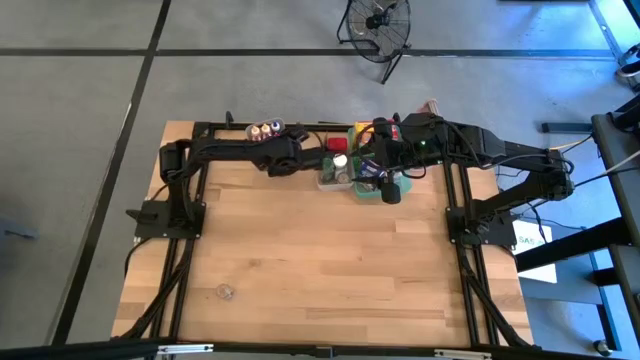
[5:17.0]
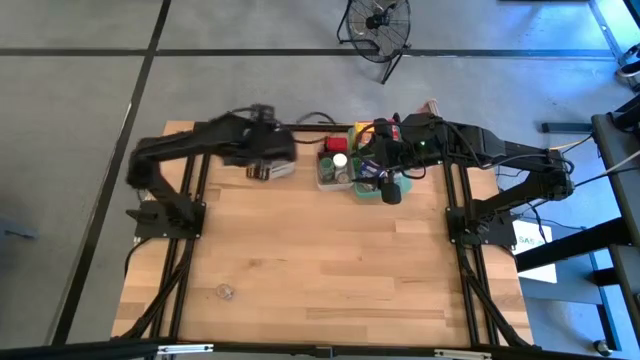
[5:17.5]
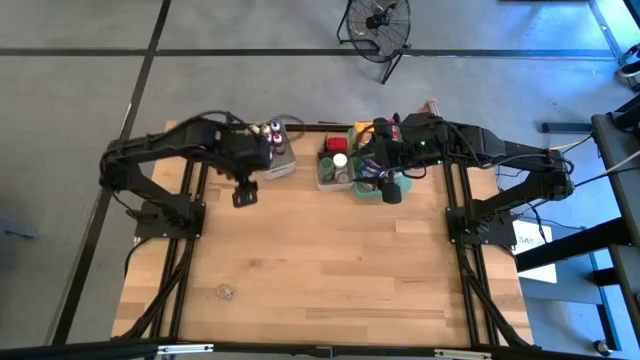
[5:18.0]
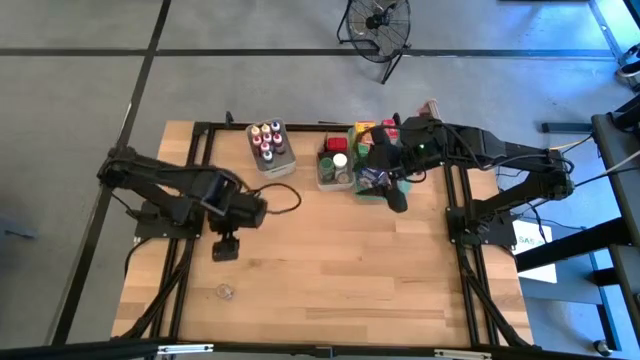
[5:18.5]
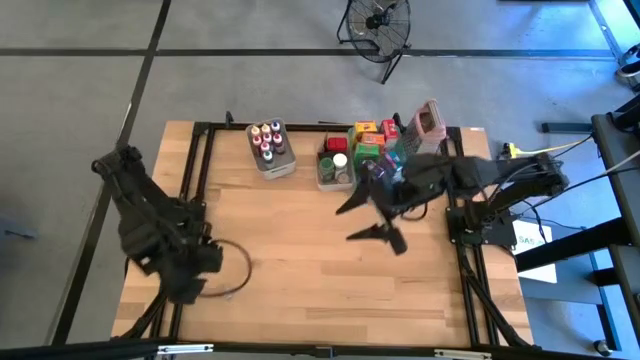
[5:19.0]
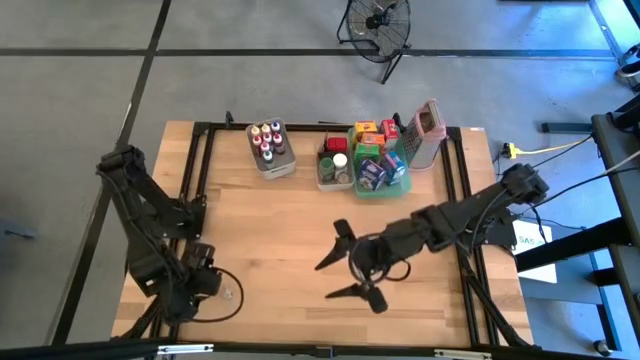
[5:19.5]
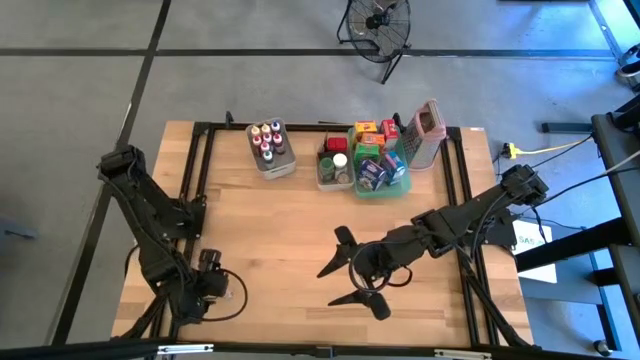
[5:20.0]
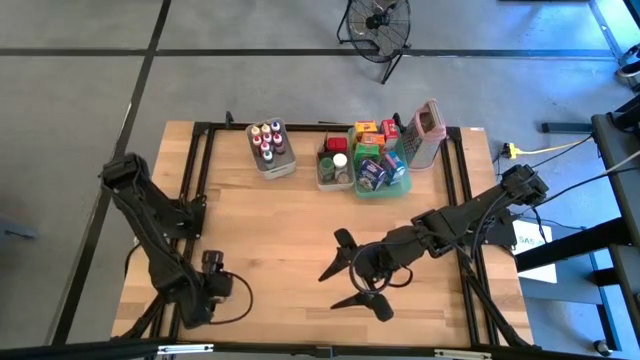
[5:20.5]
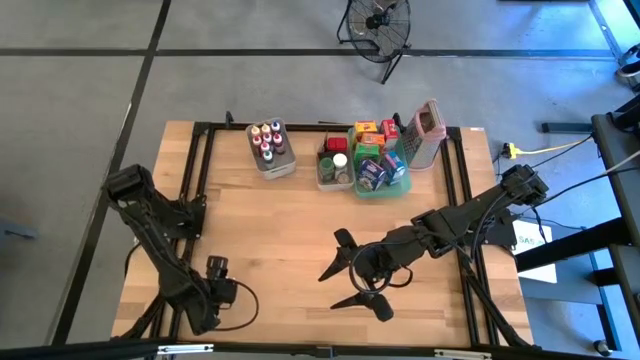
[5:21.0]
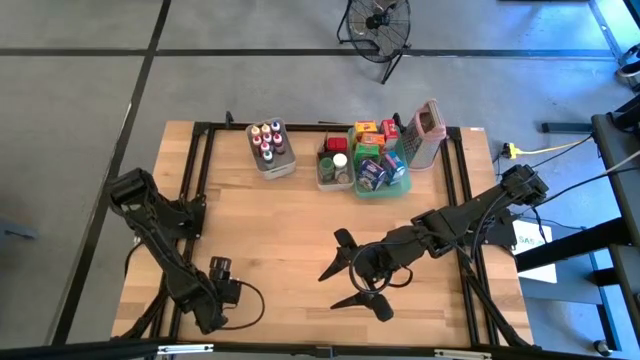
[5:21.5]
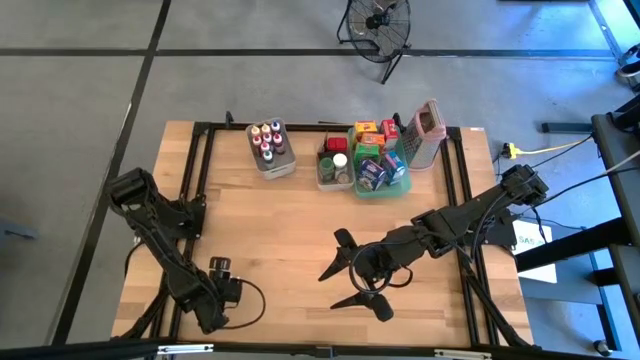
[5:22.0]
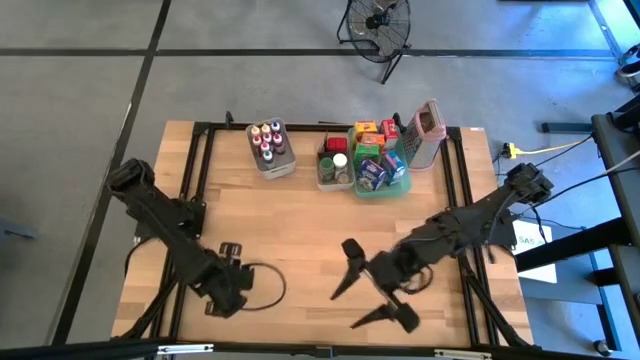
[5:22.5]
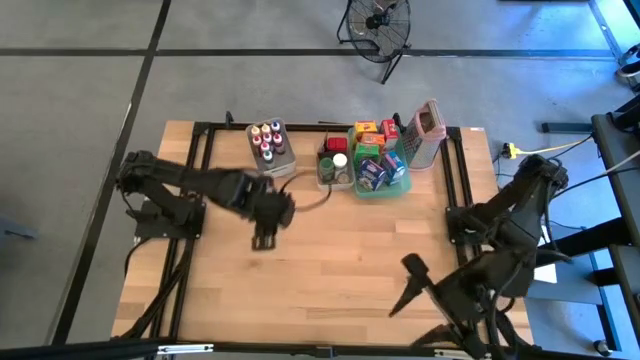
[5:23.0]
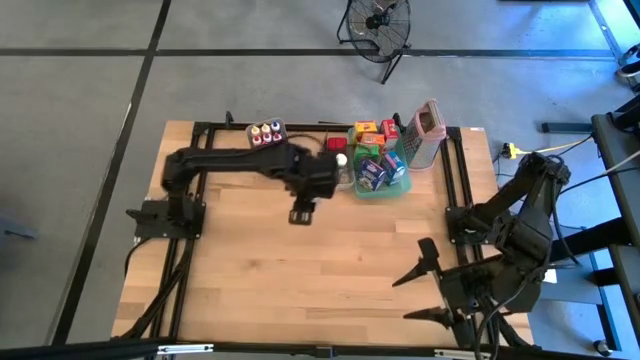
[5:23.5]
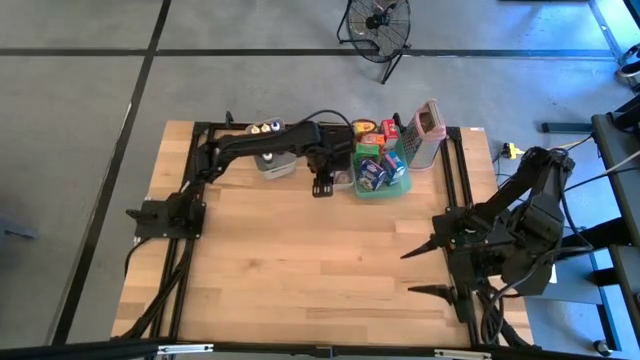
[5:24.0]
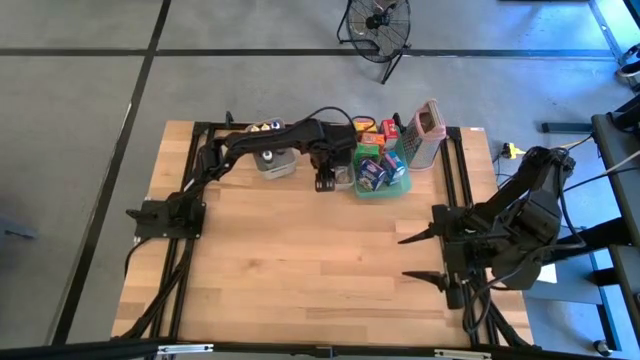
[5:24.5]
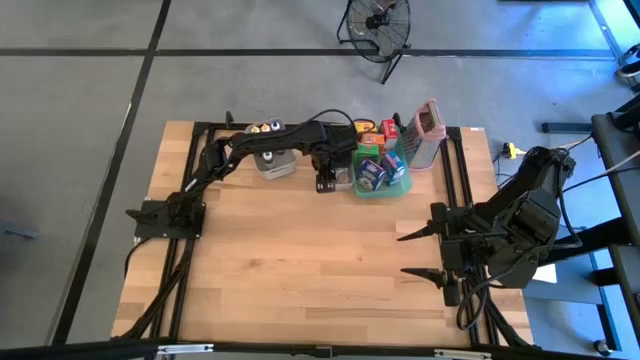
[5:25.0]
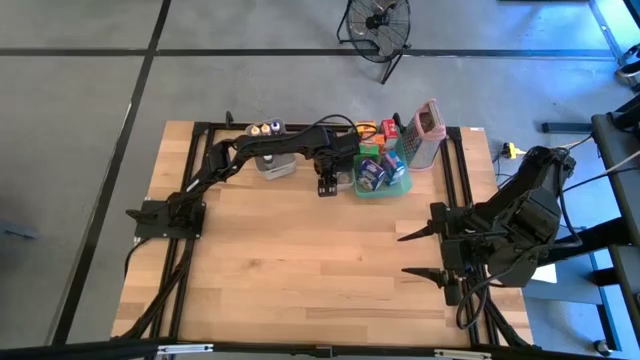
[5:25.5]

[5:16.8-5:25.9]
Task: Pick & Place Kitchen Items
Put the brown seasoning bottle into the white bin

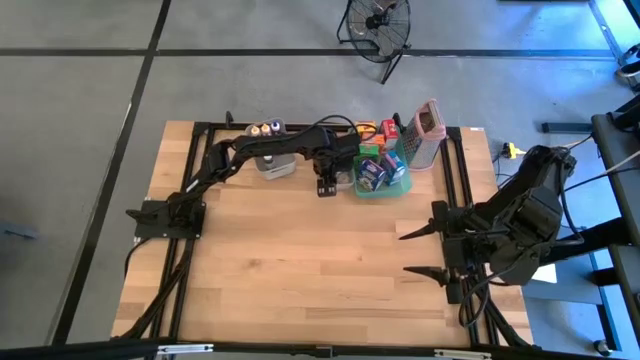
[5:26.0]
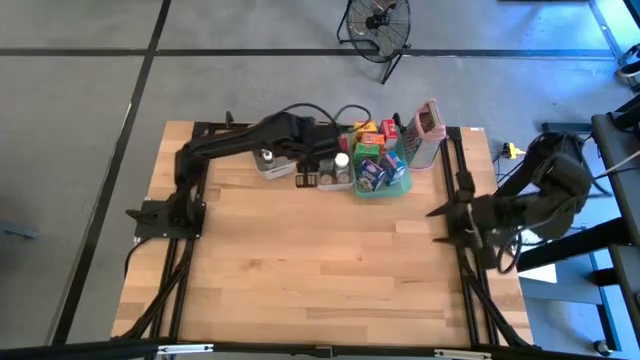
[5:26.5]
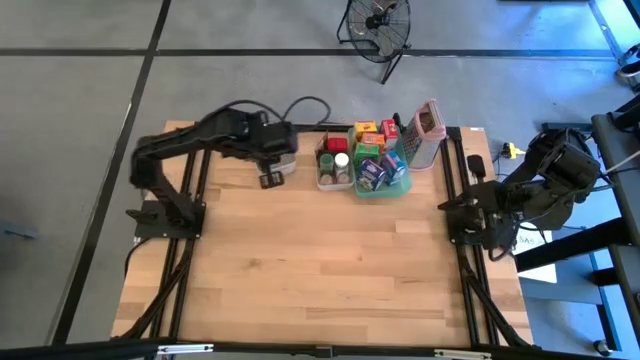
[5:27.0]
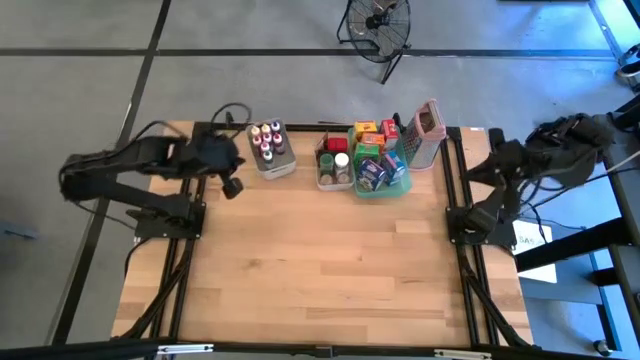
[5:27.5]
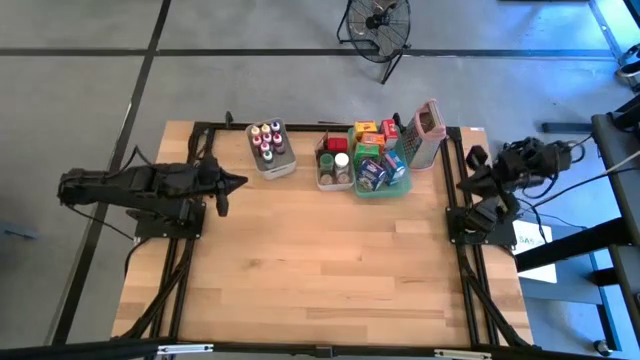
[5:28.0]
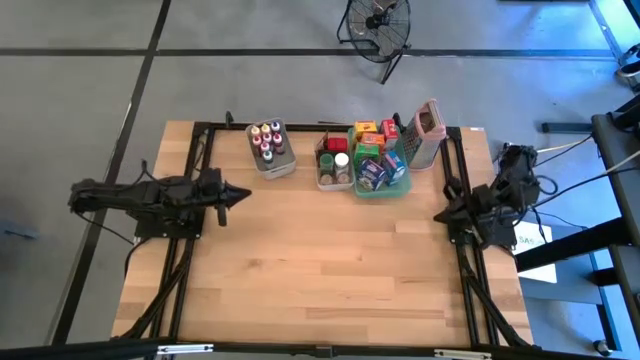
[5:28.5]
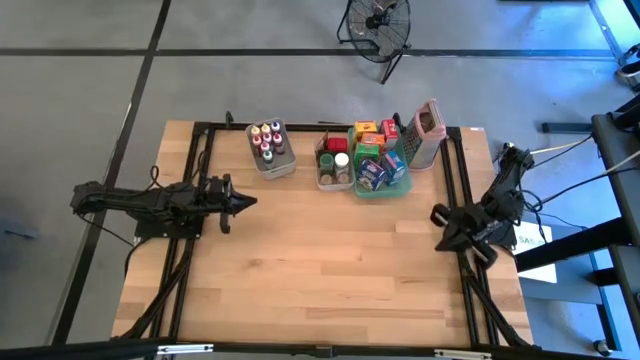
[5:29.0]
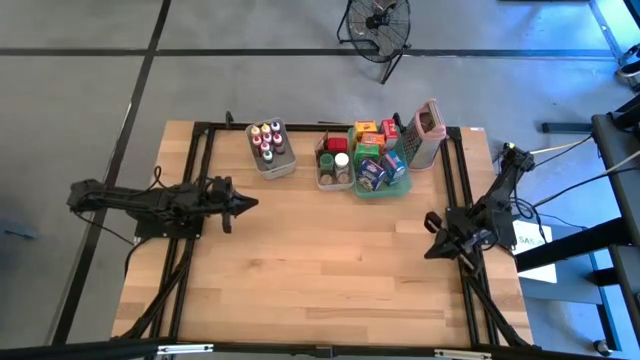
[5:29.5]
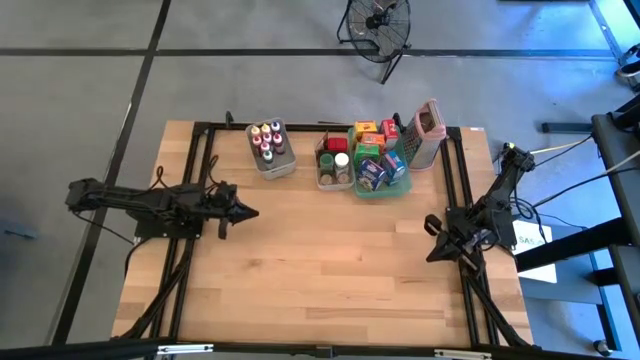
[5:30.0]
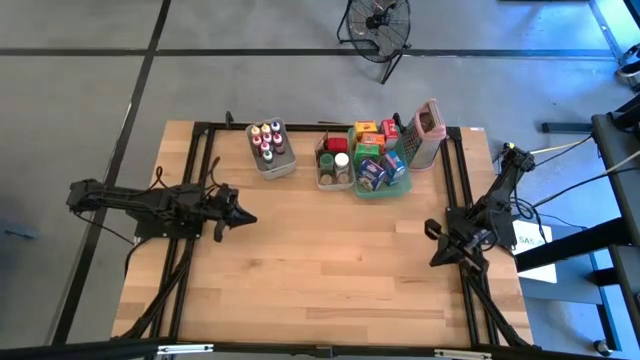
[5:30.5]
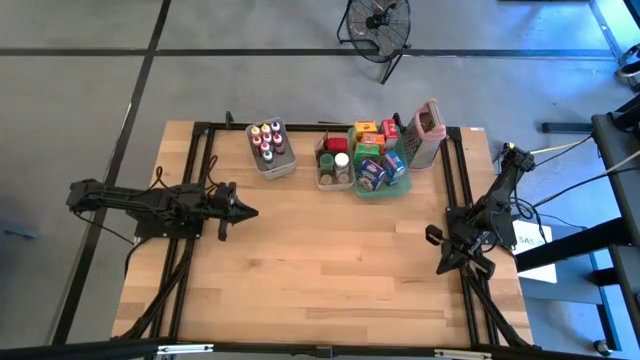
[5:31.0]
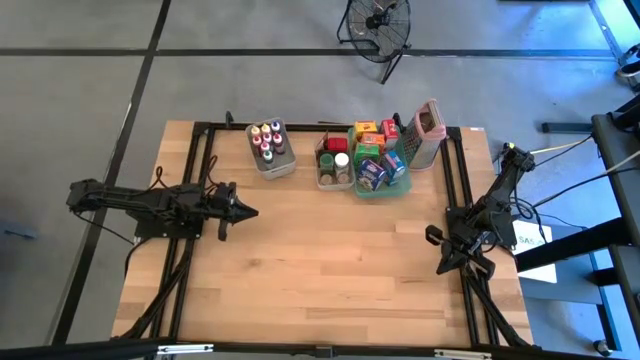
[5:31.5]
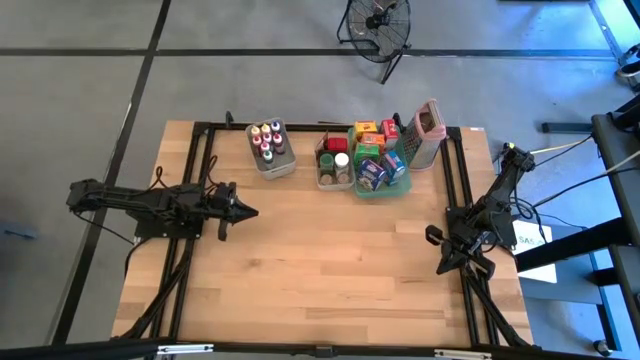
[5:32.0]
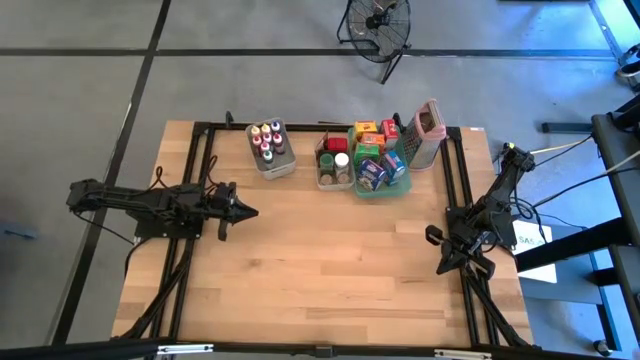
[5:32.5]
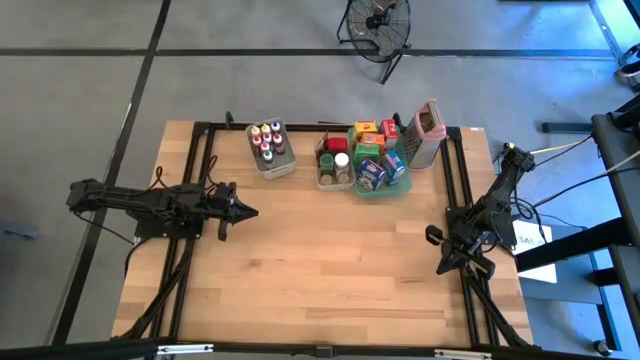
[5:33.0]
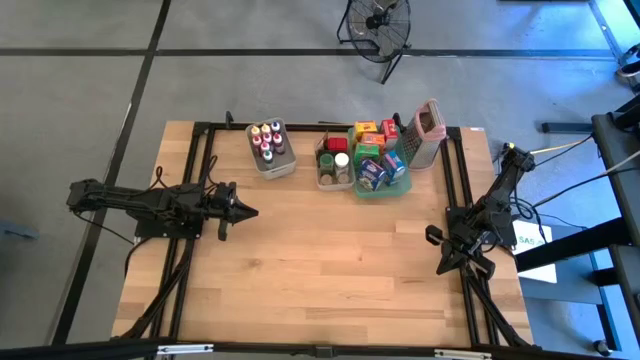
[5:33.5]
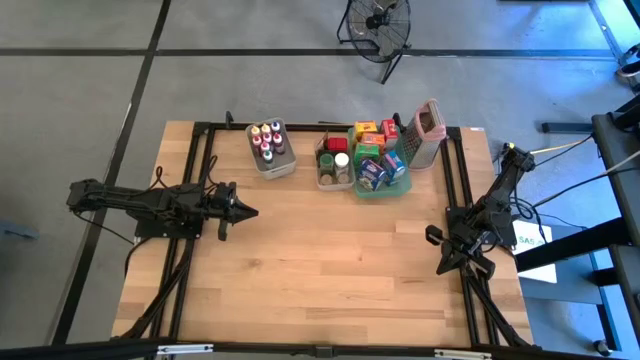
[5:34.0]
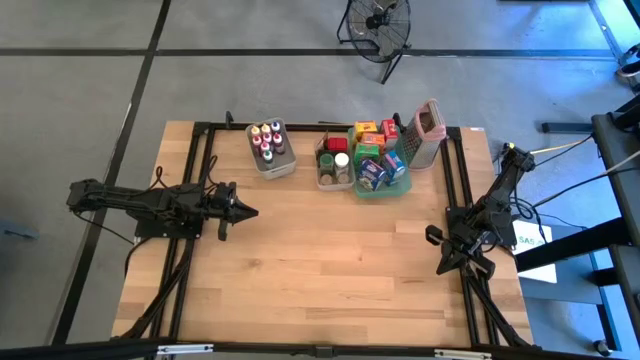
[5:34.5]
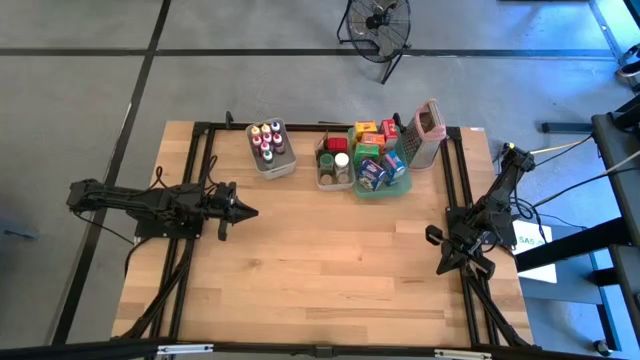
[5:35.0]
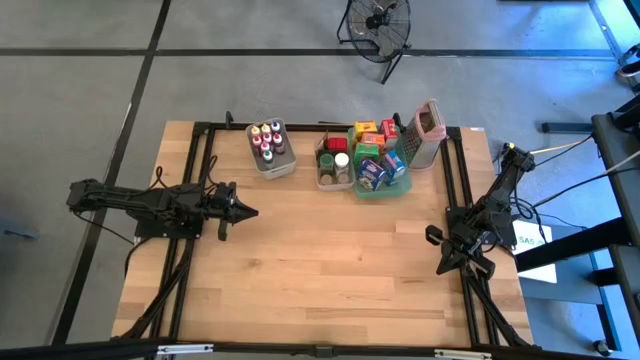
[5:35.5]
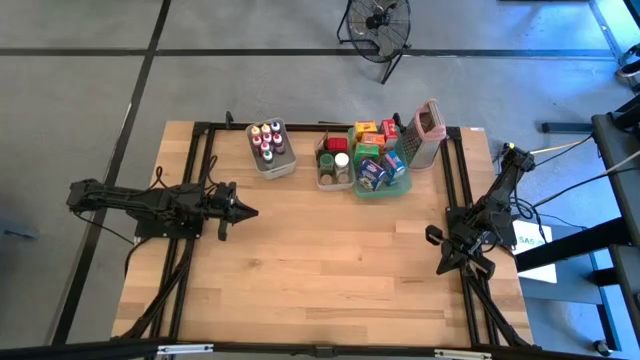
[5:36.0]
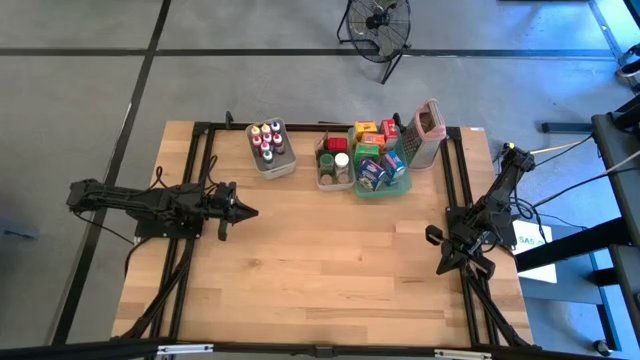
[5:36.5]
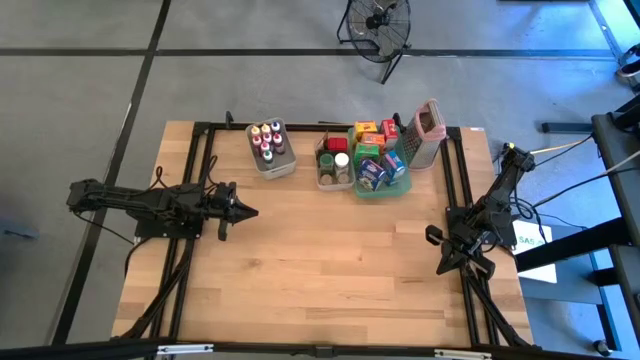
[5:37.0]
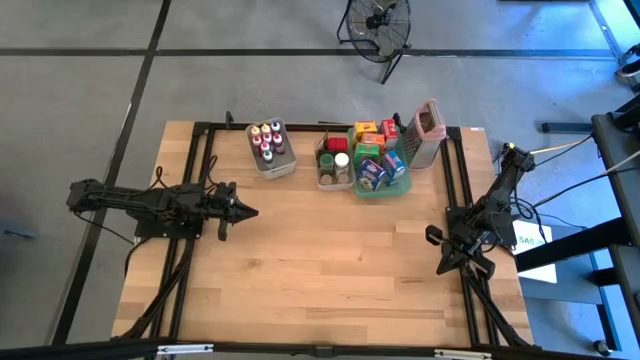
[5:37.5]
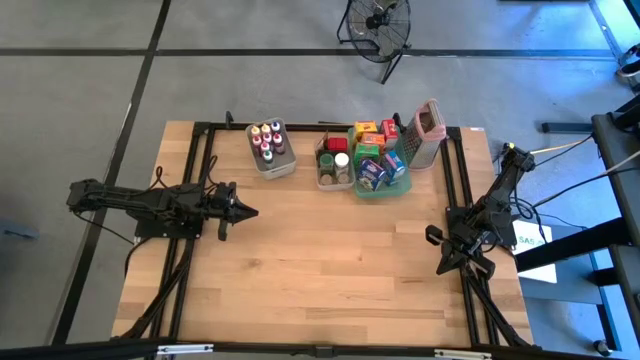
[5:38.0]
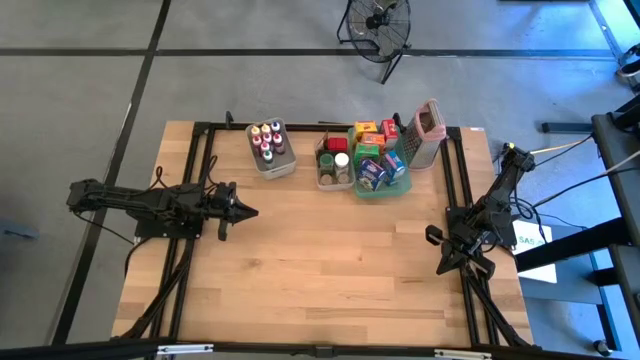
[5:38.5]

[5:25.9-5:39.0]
Return to Home Position
